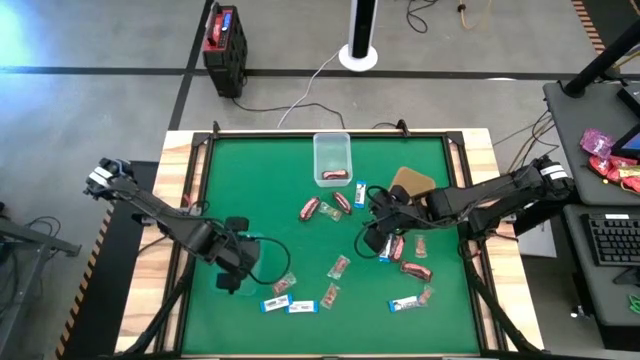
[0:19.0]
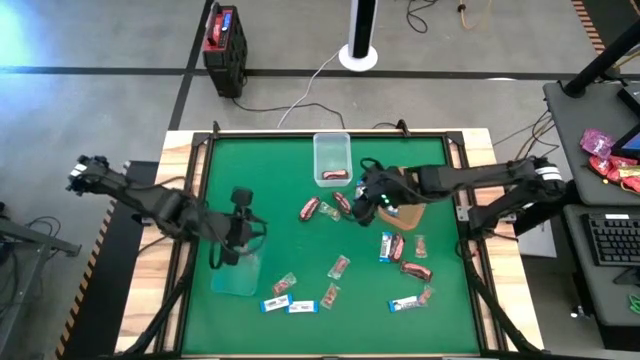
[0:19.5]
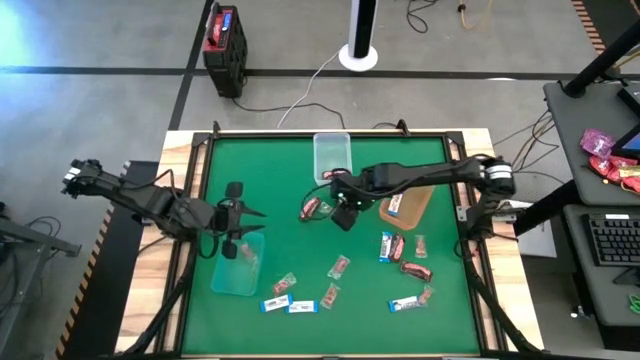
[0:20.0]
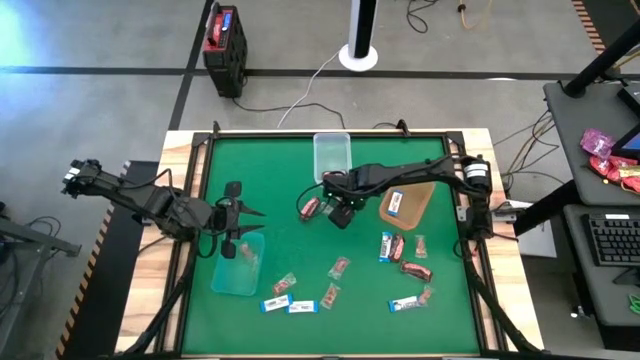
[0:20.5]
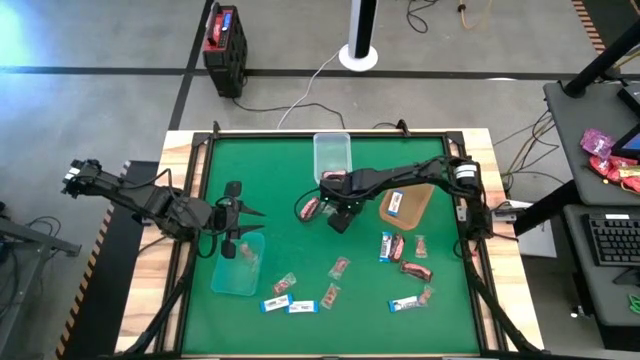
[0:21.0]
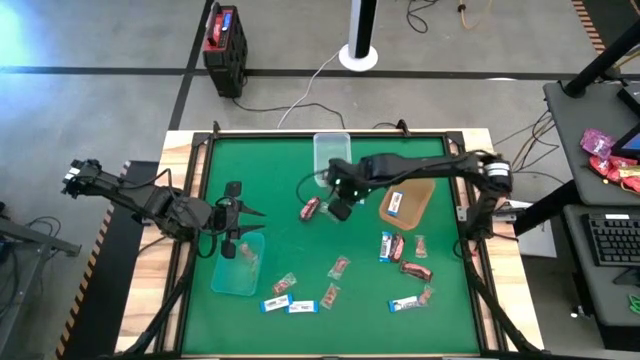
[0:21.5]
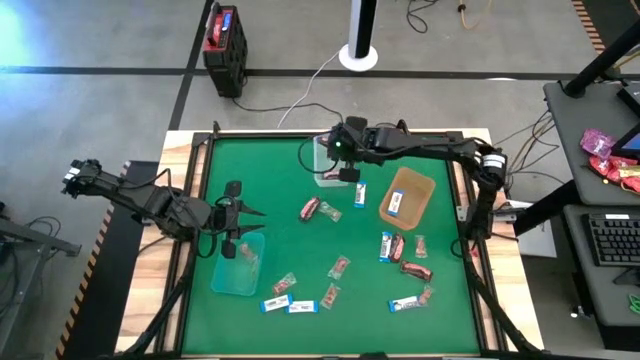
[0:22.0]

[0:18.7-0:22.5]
Task: Sort candy by brand, put in halloween buckets
Put the brown chocolate into the top transparent bin

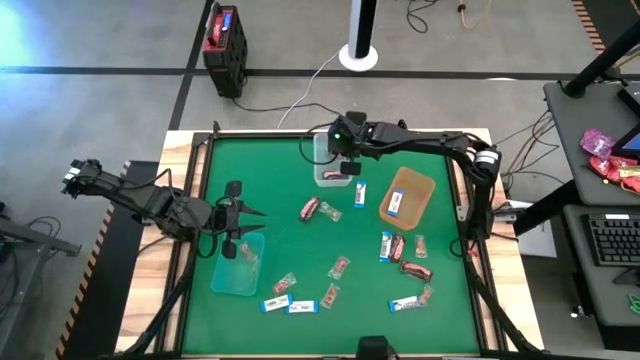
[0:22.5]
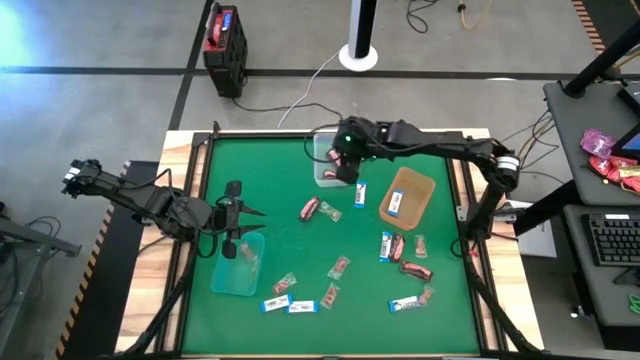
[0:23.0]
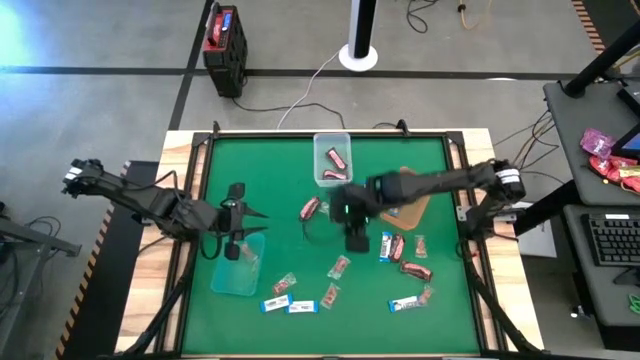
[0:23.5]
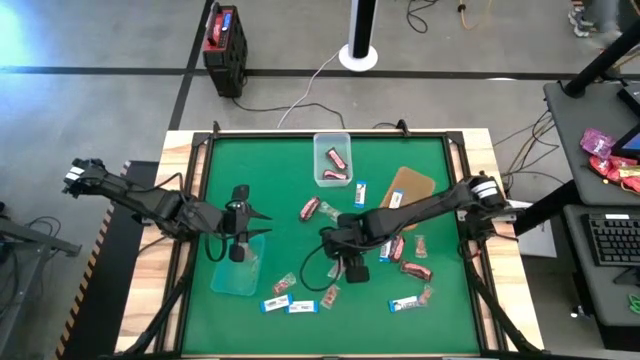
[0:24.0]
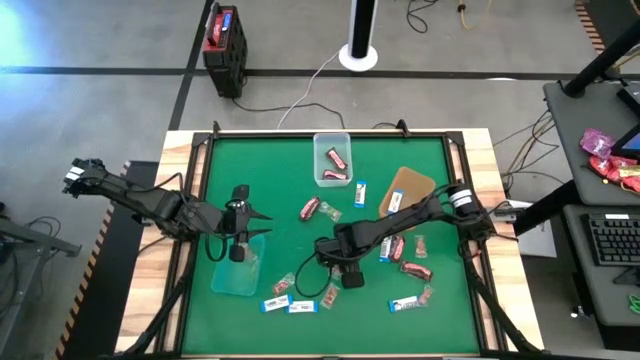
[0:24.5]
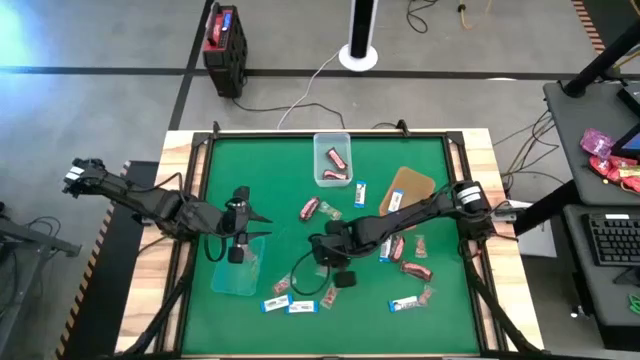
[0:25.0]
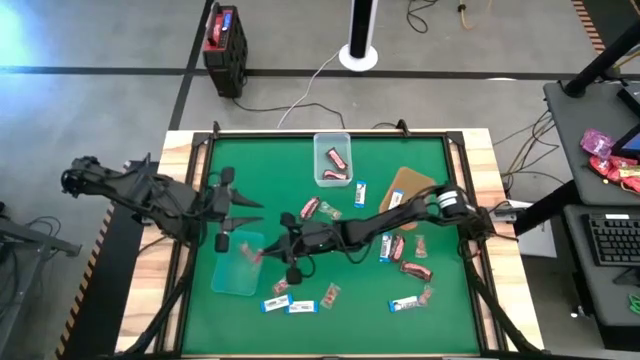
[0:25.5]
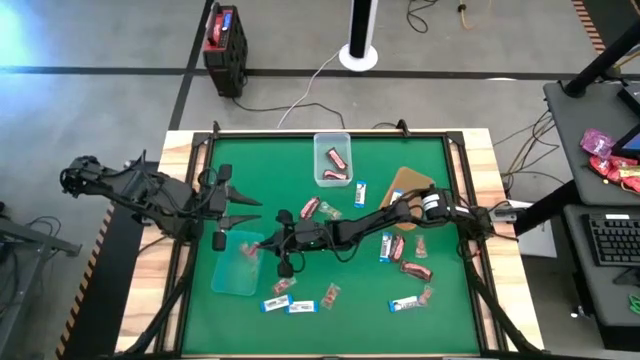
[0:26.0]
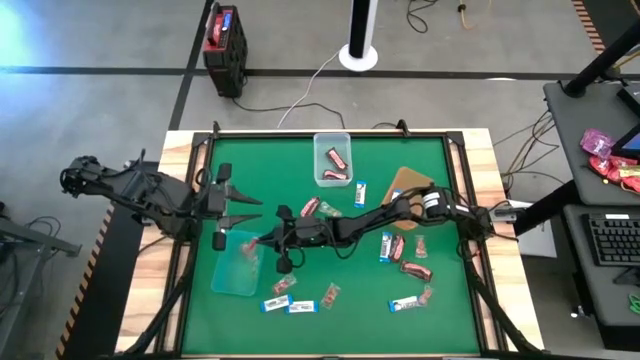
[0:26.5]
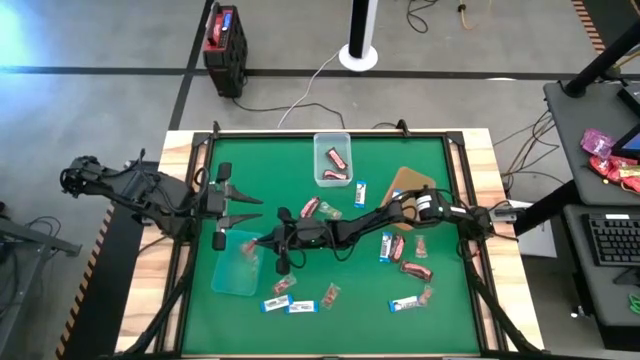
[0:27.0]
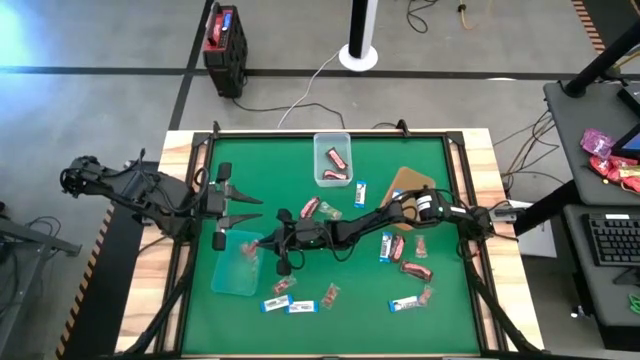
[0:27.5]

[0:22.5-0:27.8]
Put the red gummy candy into the blue bin

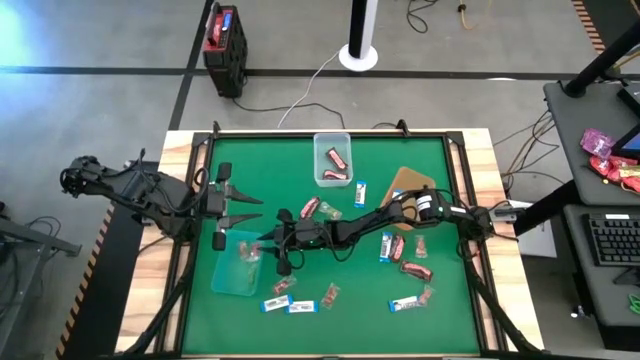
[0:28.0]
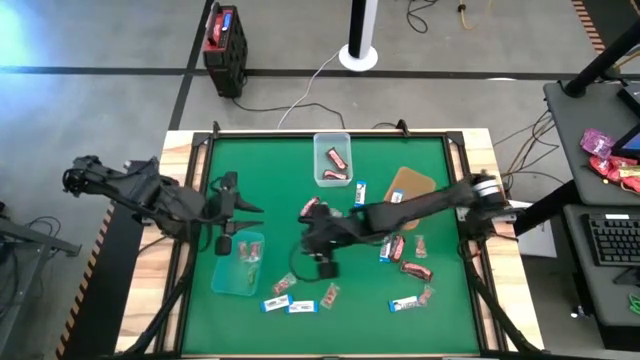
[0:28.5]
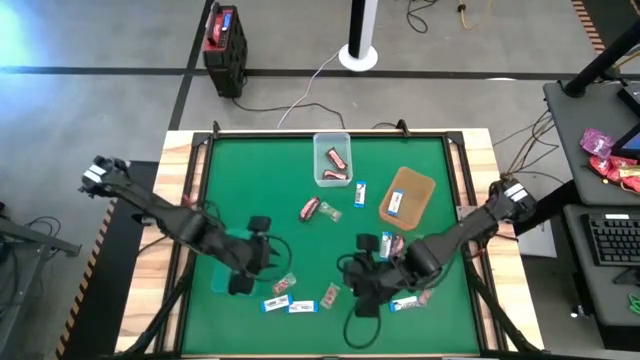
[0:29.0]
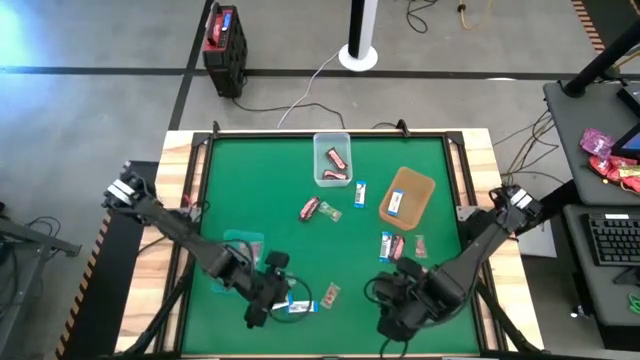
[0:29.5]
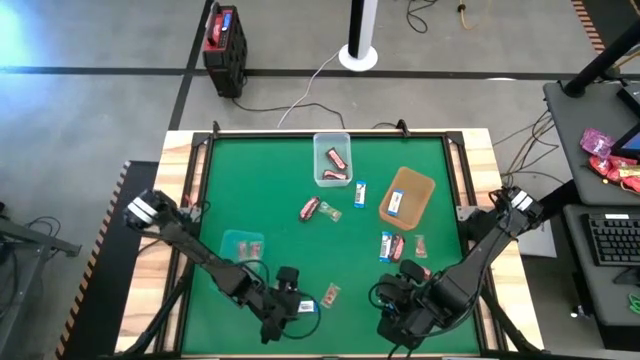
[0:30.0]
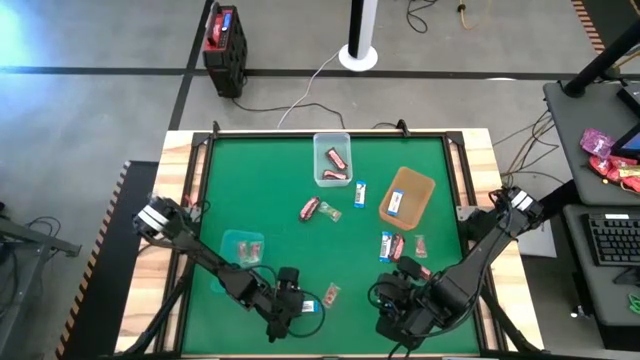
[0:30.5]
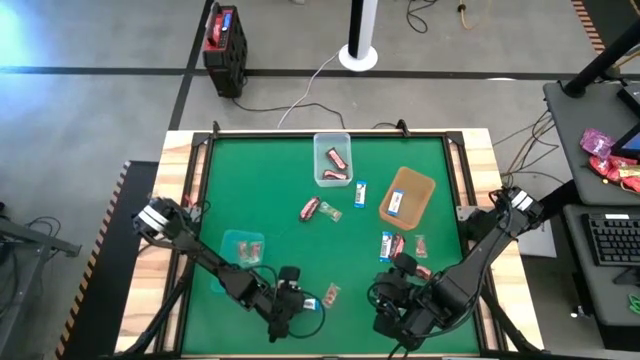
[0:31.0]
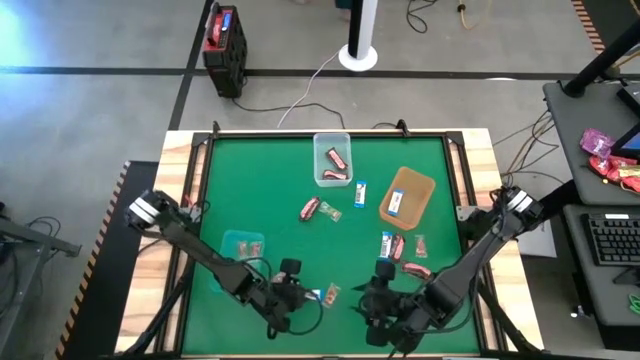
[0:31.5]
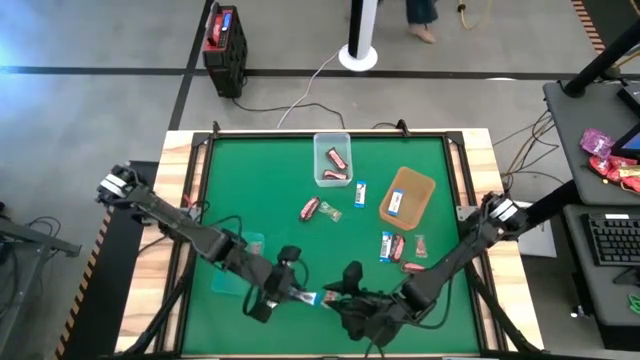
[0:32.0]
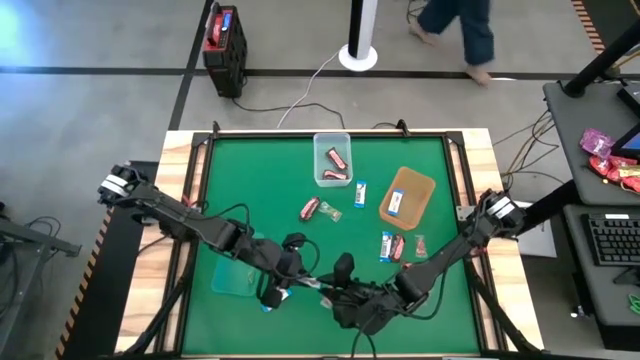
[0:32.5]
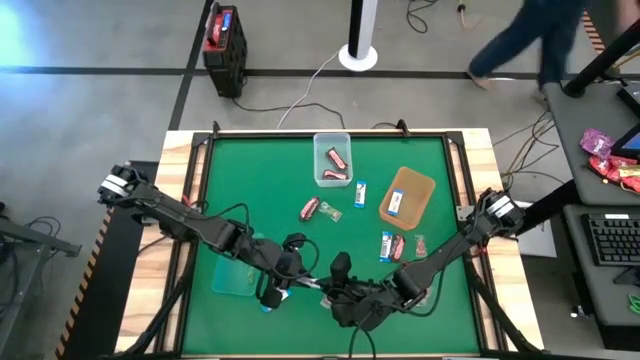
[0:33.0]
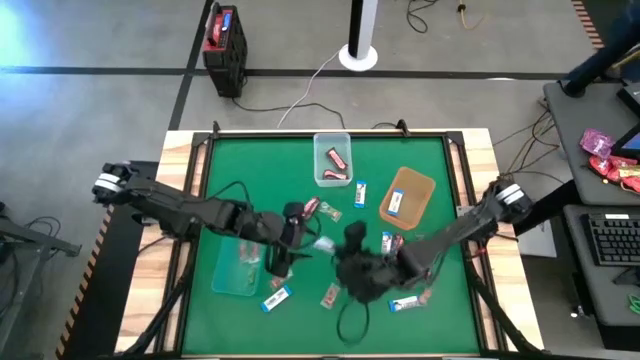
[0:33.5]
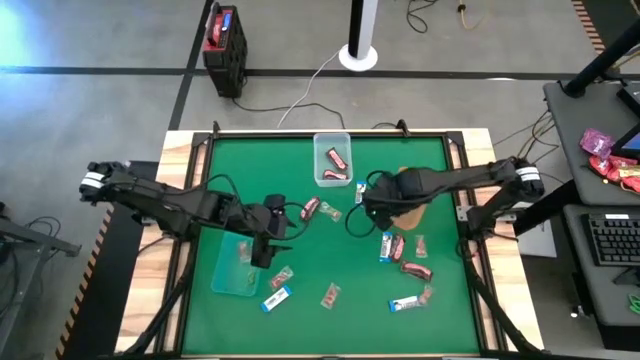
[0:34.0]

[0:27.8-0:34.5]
Put the white chocolate into the orange bin

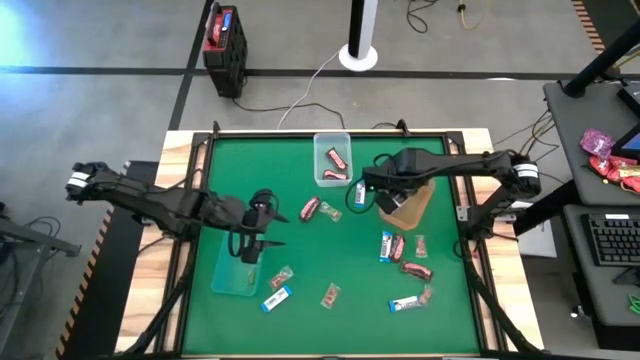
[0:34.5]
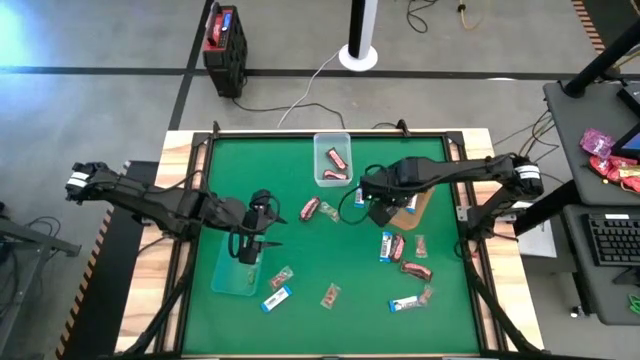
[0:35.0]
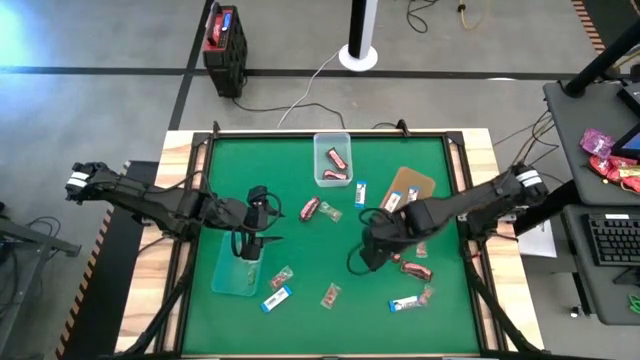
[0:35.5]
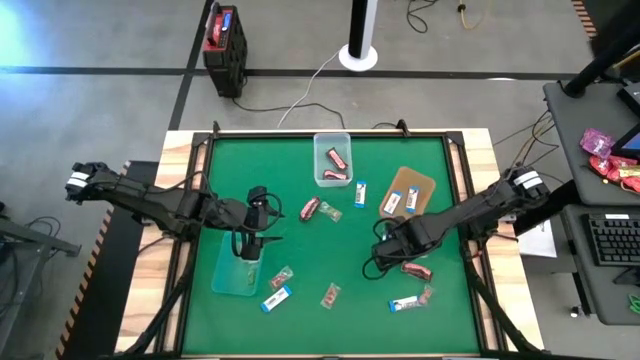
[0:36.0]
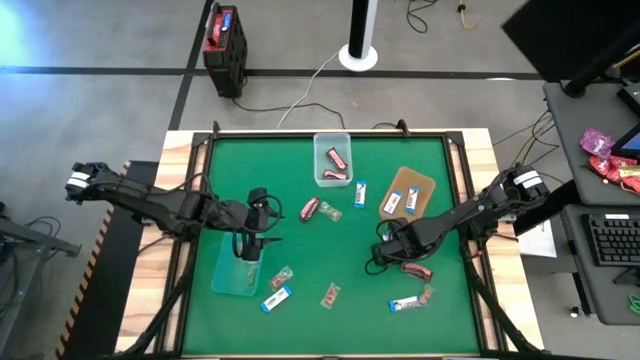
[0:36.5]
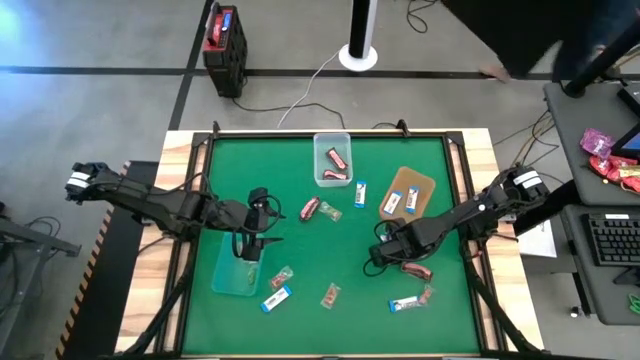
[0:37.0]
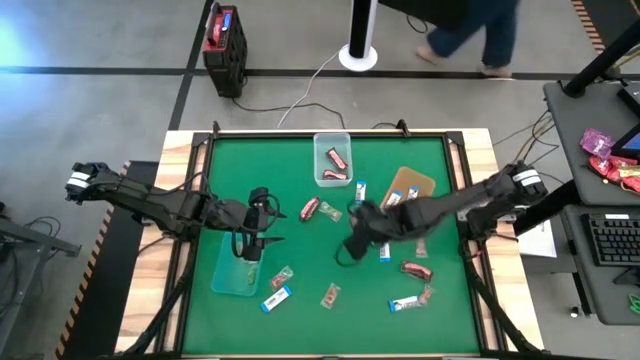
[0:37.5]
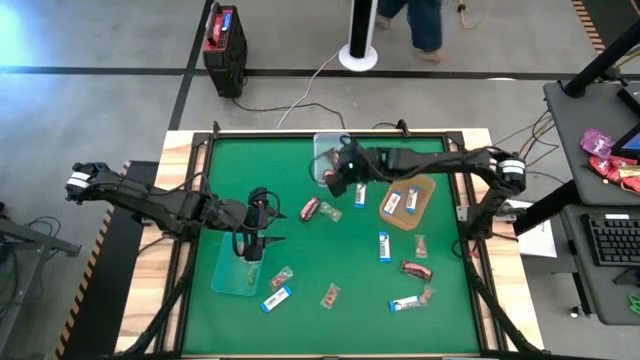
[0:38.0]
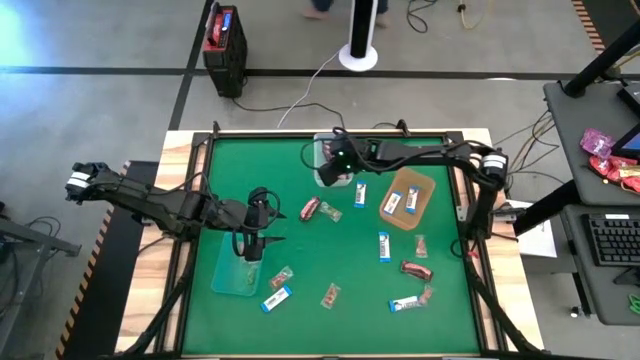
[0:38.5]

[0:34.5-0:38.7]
Put the brown chocolate into the top transparent bin

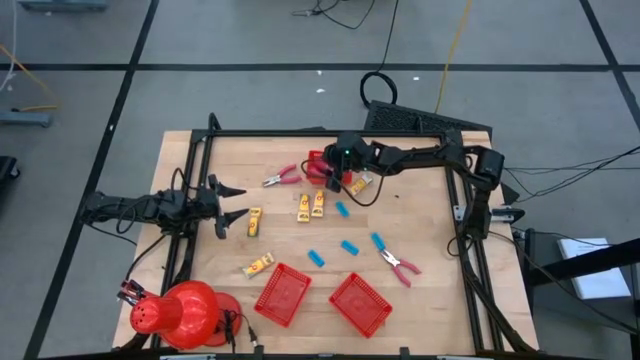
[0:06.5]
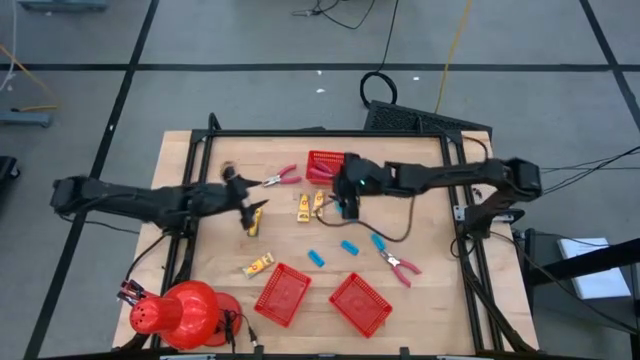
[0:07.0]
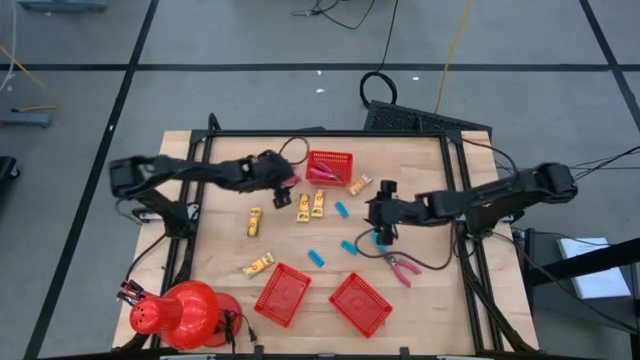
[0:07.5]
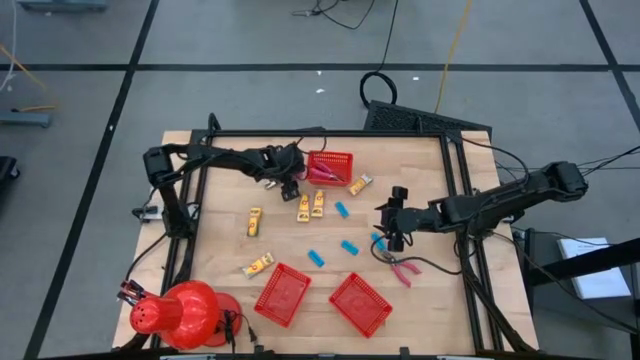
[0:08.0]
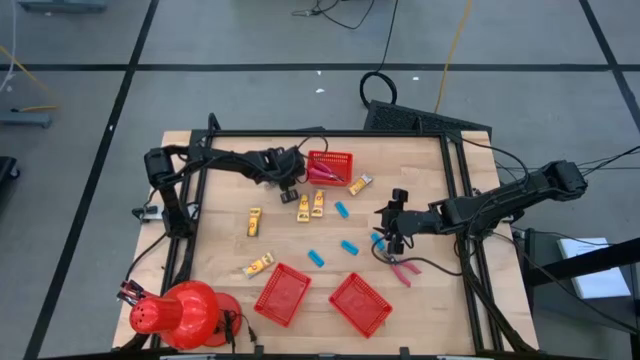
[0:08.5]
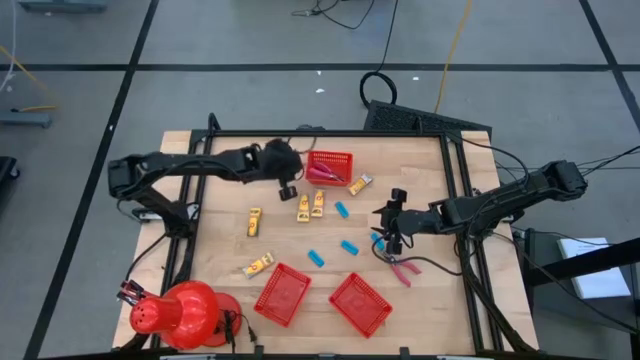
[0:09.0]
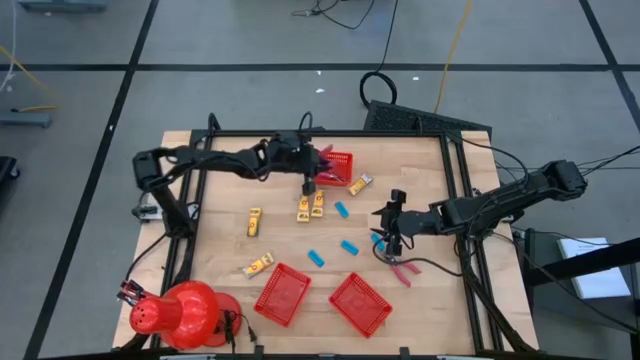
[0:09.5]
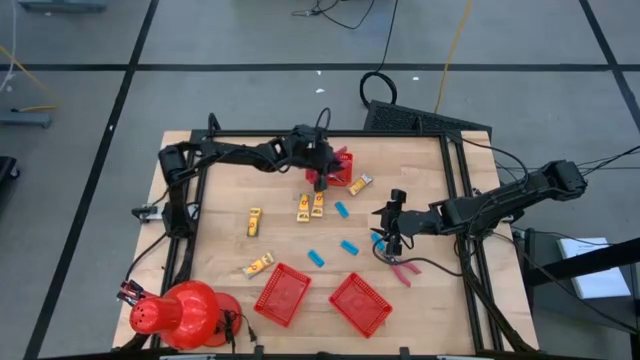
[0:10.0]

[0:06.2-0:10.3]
Task: Pick & Place School Supplies
Put the top pink puncher into the top red basket
